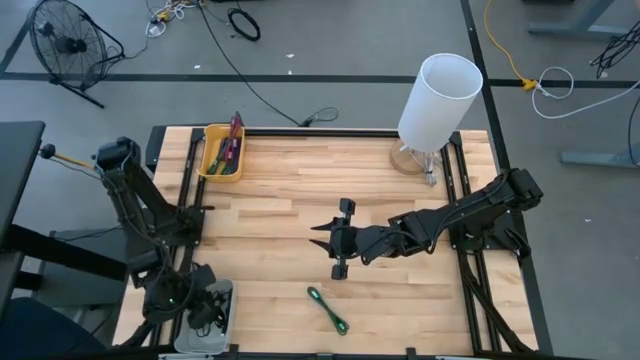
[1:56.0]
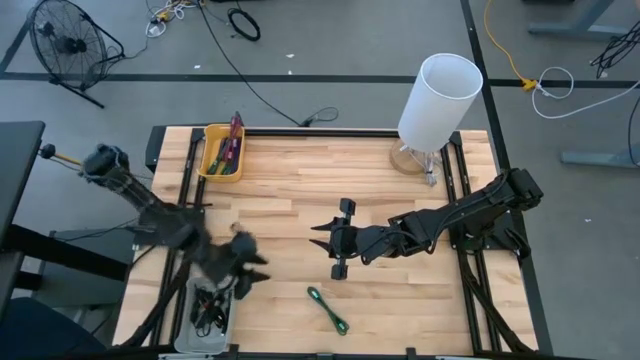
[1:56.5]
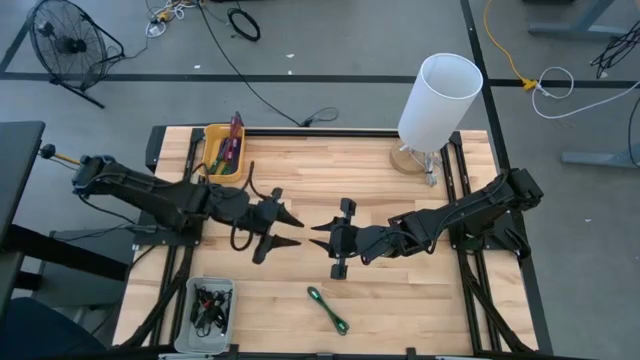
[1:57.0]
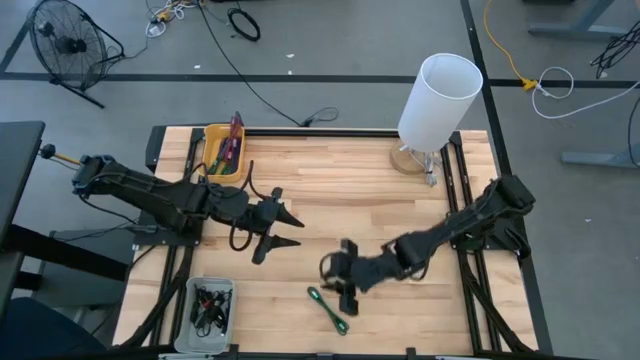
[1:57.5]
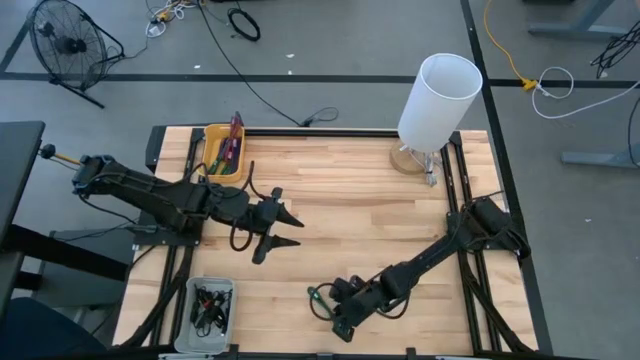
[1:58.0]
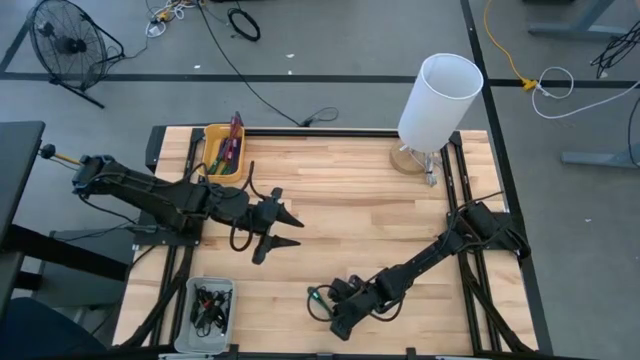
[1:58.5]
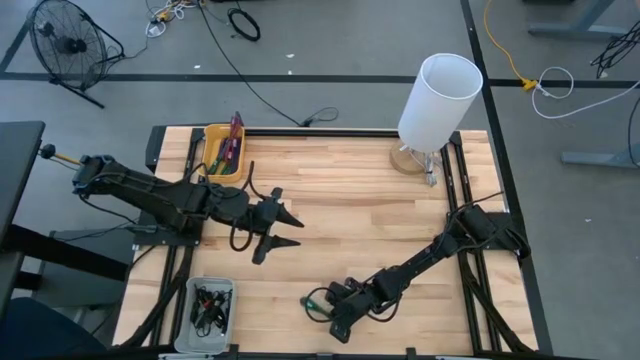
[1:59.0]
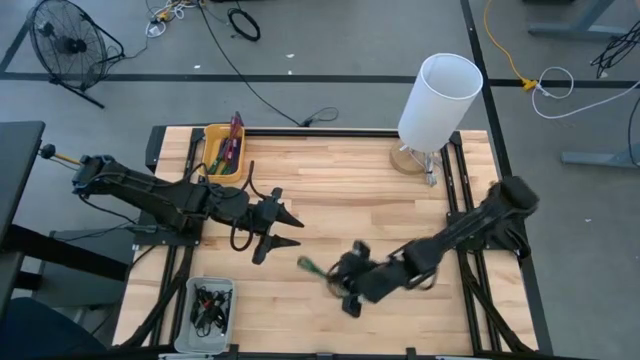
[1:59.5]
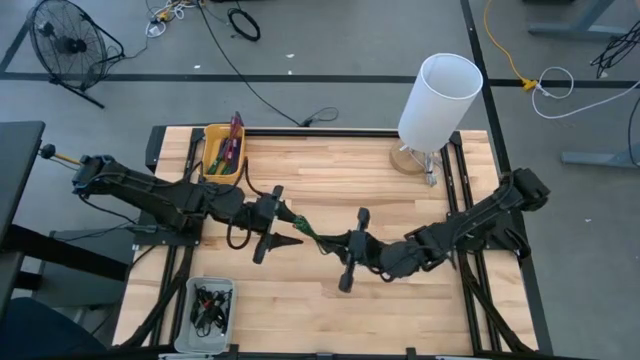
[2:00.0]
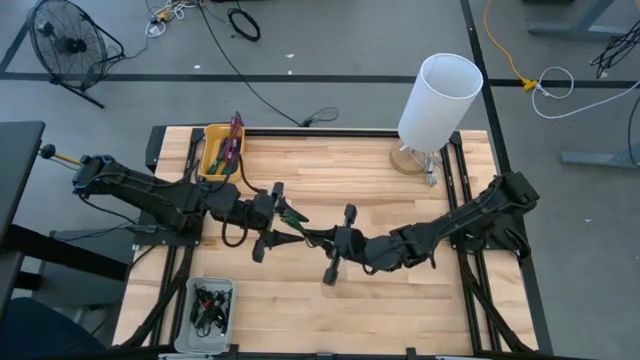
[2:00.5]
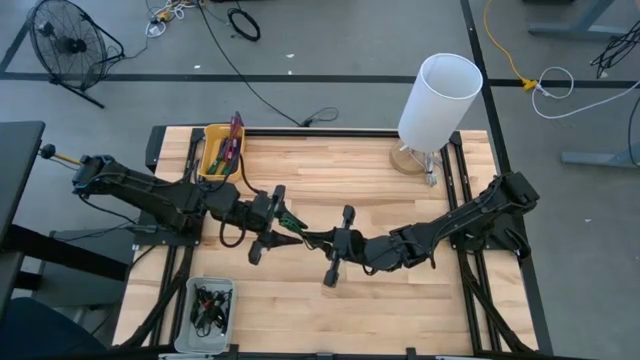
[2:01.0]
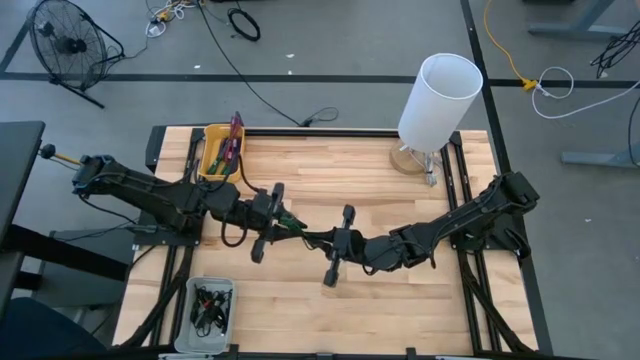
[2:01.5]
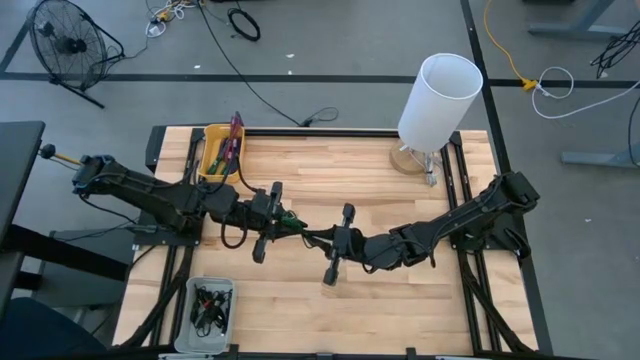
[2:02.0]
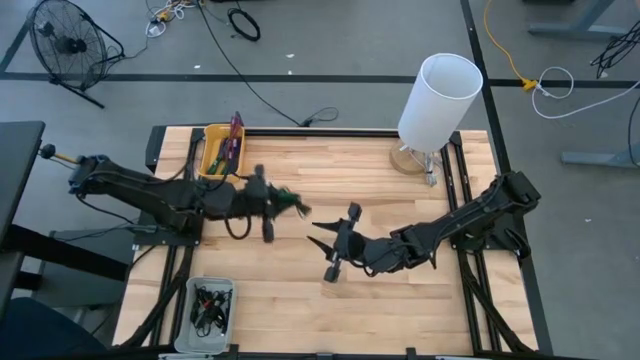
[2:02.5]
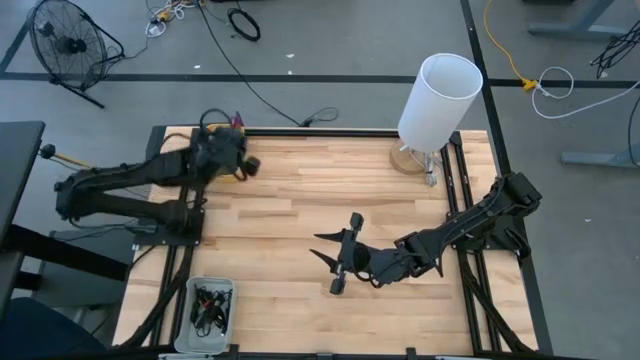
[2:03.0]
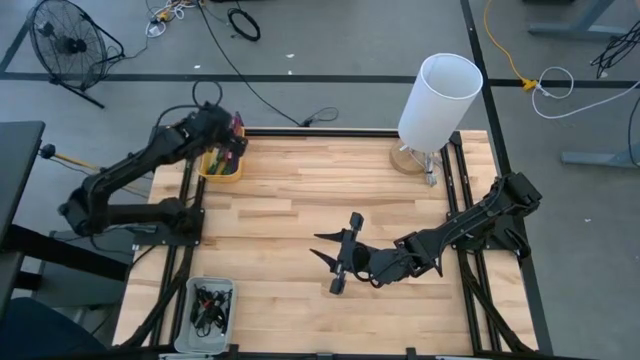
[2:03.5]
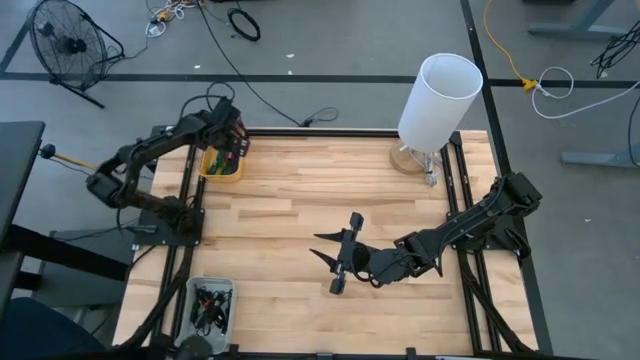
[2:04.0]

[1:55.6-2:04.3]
Task: Pick & Place USB Port
Put the green charger cable into the yellow bin

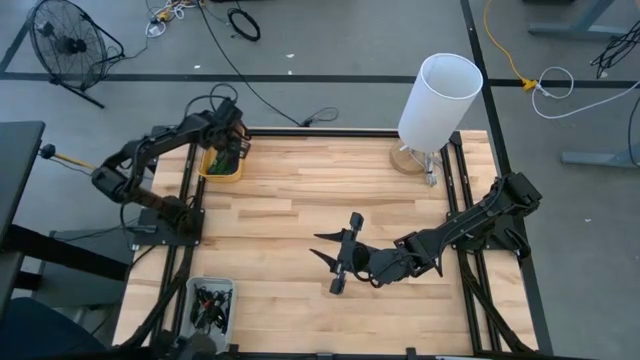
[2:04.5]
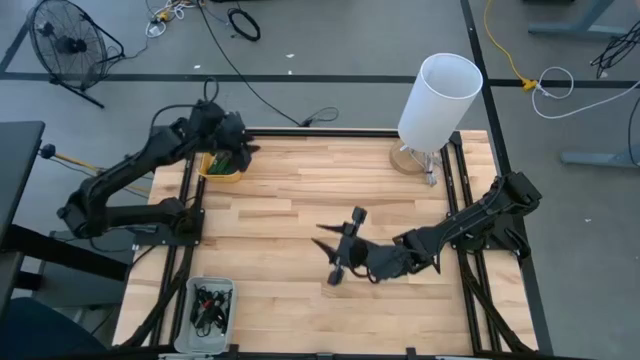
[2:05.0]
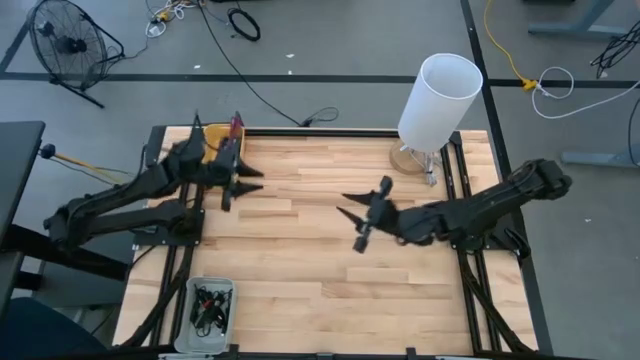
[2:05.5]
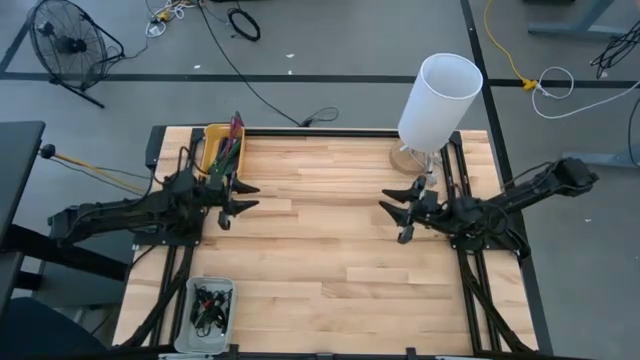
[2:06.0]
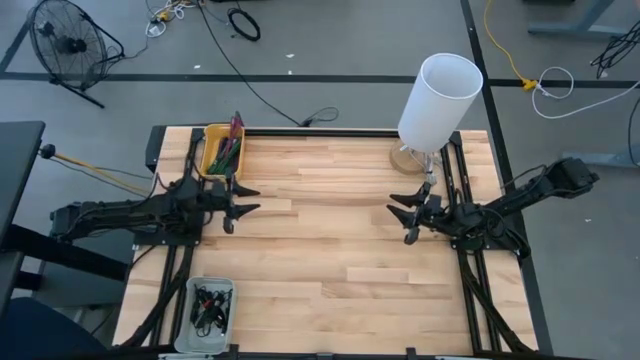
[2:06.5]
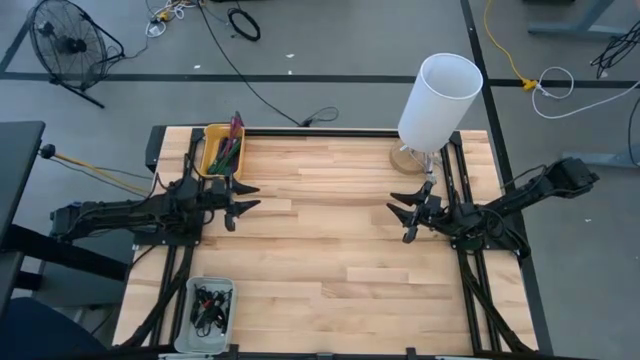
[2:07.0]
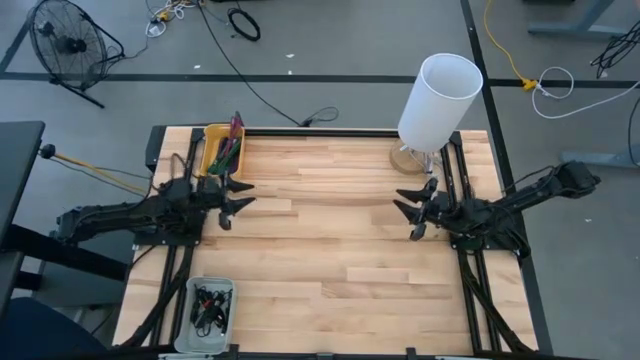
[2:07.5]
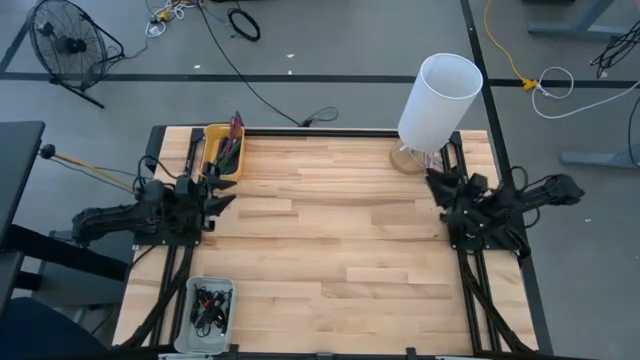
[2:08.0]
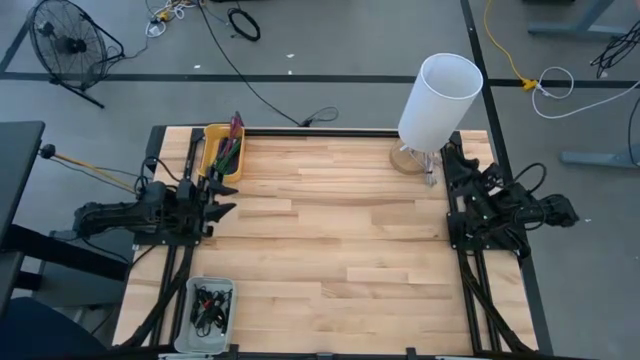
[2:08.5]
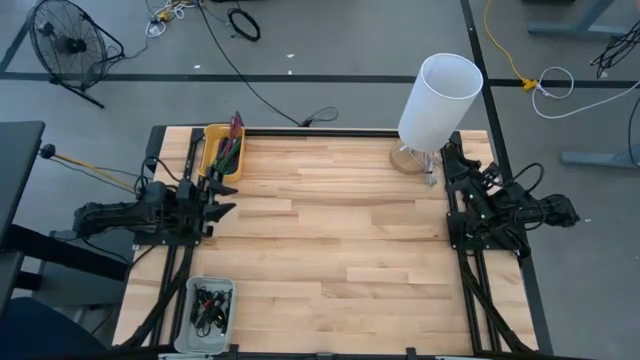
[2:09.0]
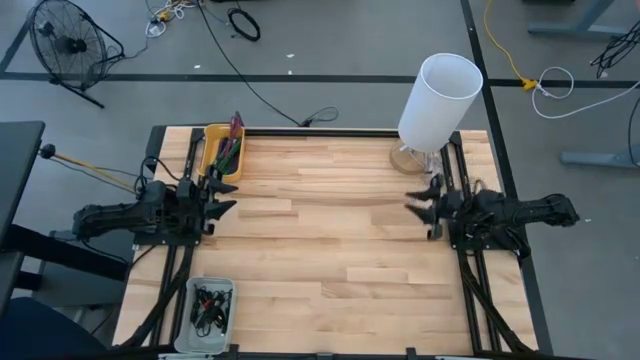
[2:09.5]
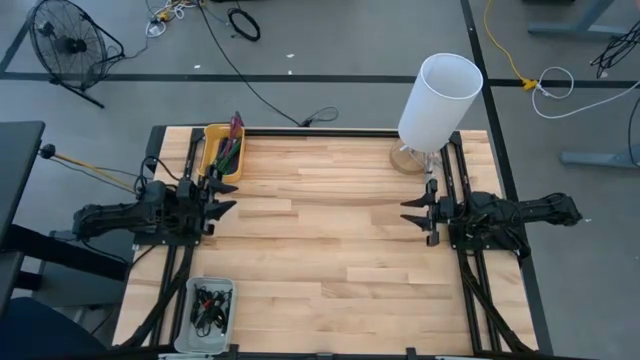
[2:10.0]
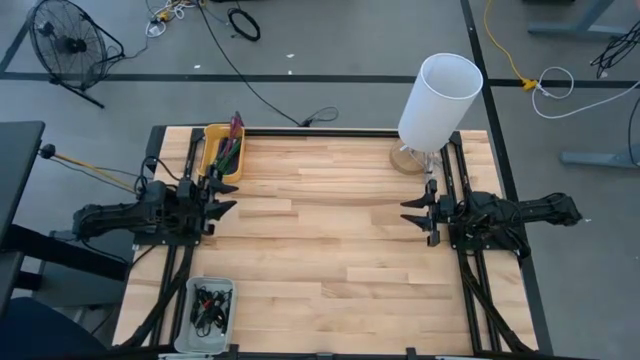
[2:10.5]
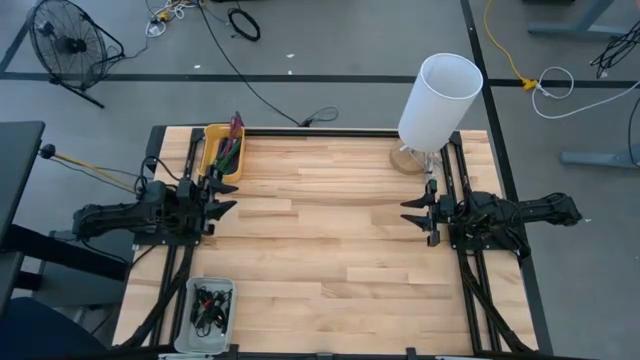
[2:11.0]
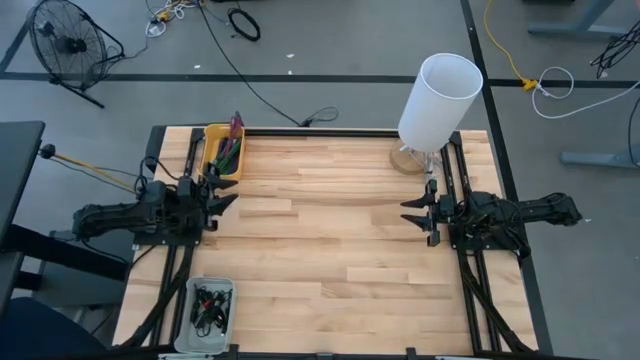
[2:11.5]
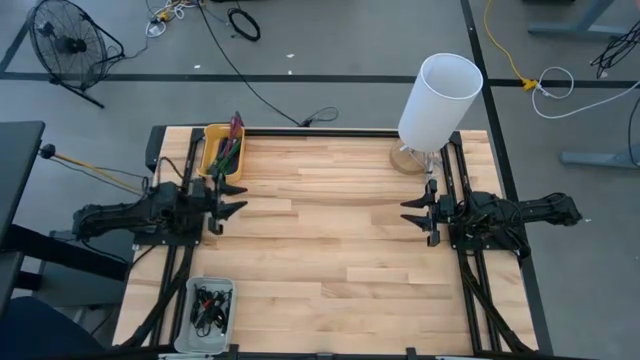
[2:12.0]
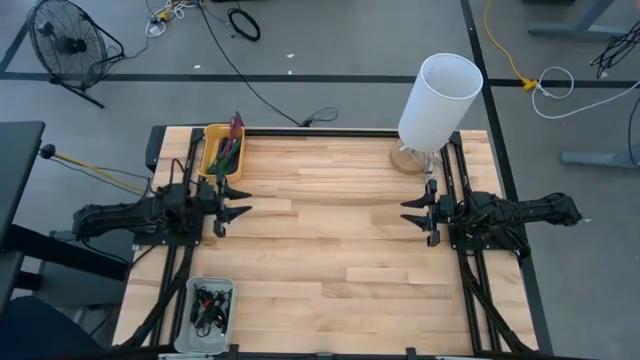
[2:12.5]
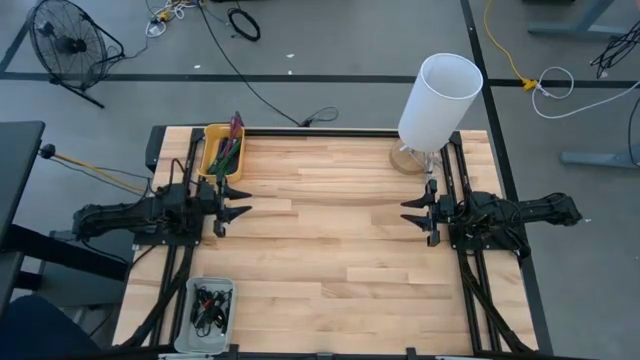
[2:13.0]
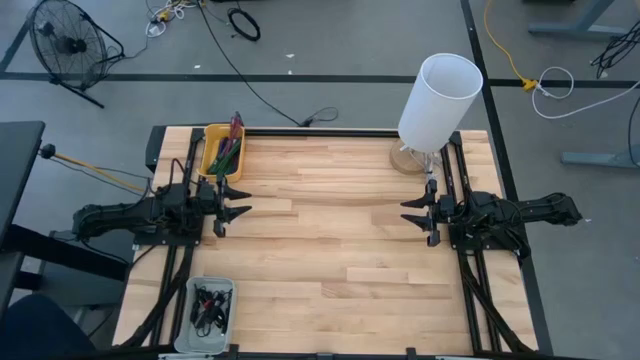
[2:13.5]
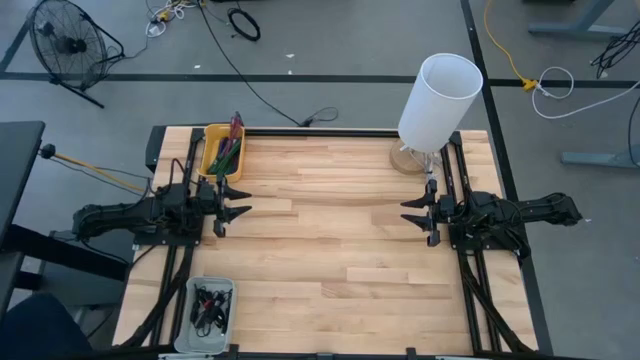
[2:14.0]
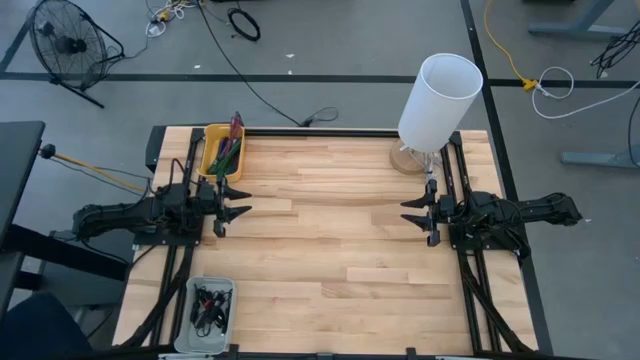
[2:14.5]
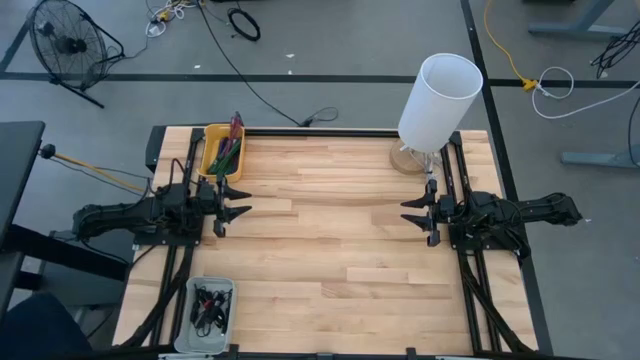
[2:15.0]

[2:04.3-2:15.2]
Return to Home Position

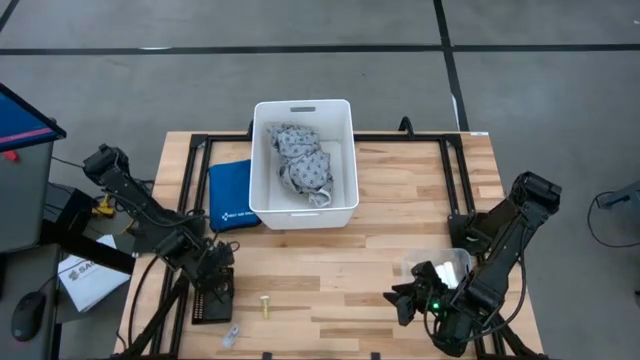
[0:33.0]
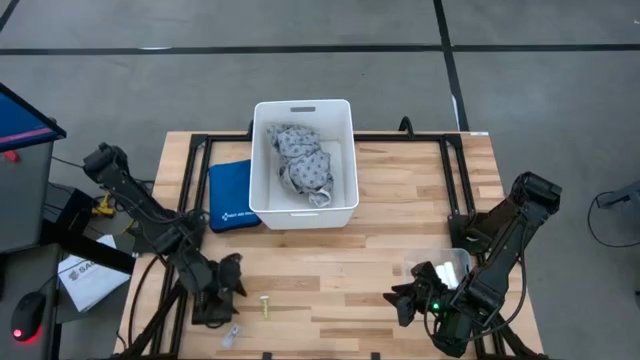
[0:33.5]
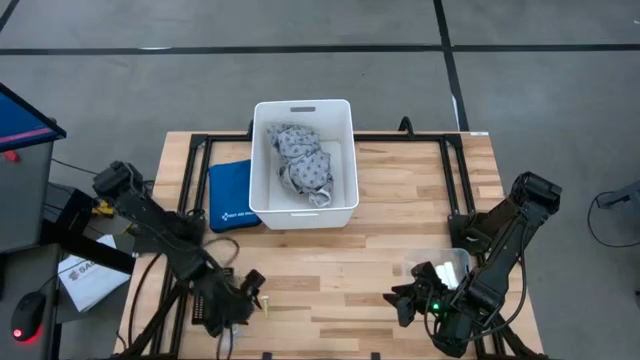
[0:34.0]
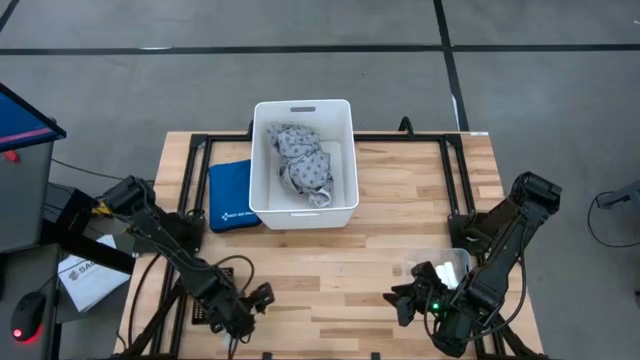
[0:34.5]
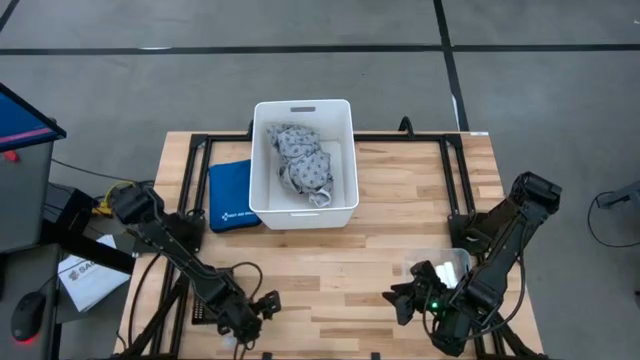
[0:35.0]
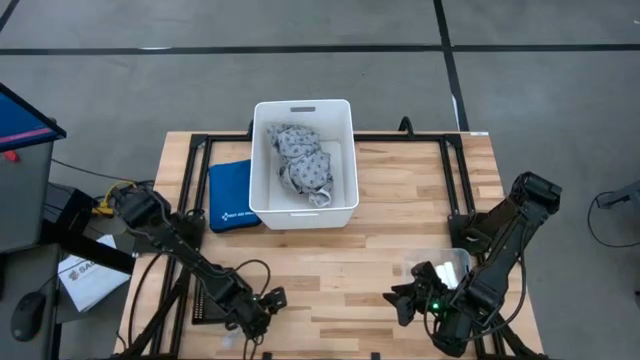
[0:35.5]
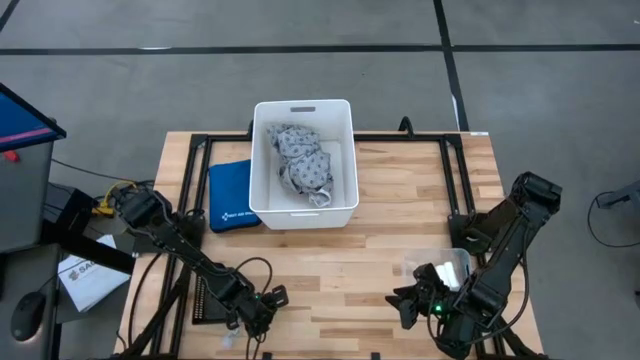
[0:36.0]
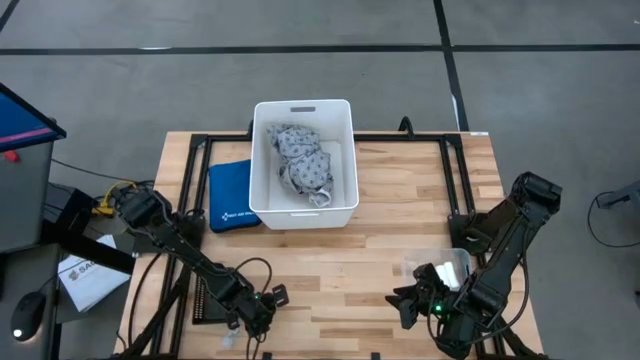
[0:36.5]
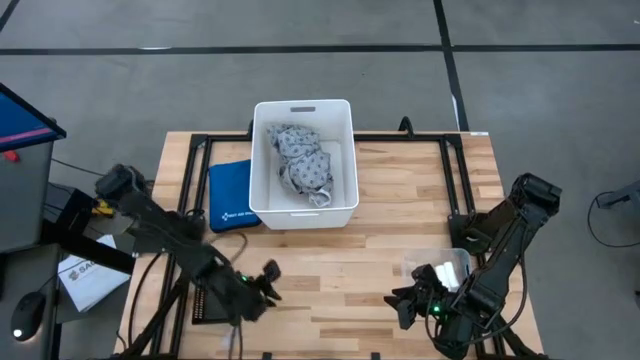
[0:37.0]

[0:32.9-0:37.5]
Task: Pick & Place Medicine items
Put the yellow pill bottle into the black bin
